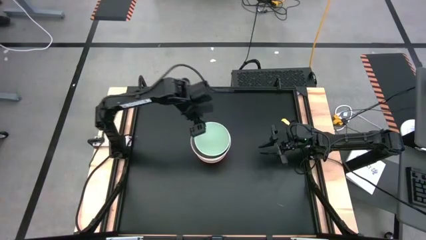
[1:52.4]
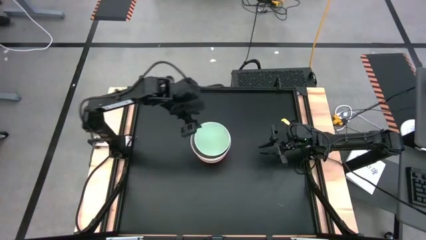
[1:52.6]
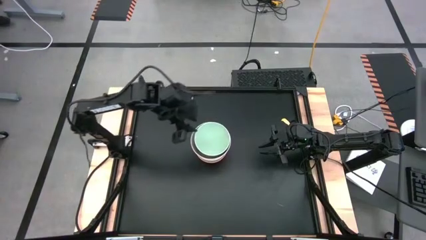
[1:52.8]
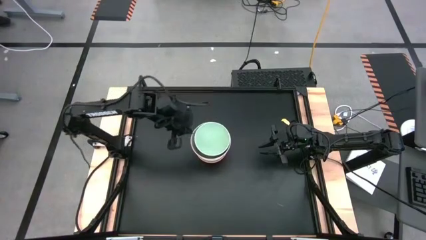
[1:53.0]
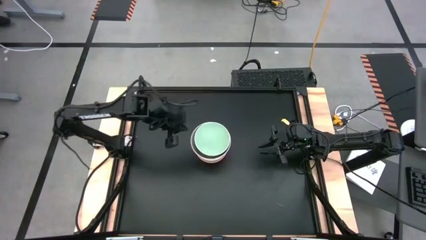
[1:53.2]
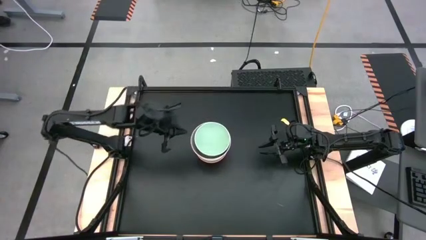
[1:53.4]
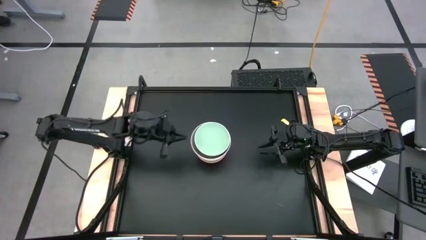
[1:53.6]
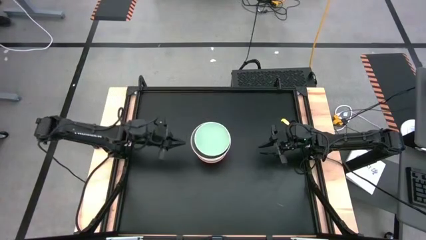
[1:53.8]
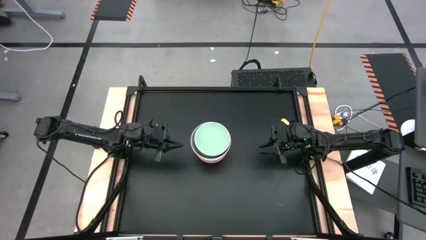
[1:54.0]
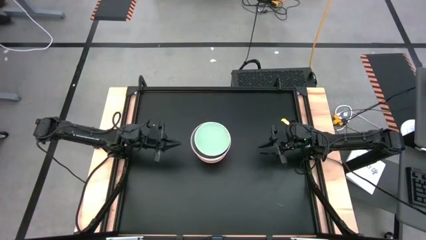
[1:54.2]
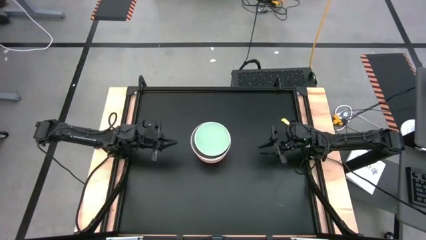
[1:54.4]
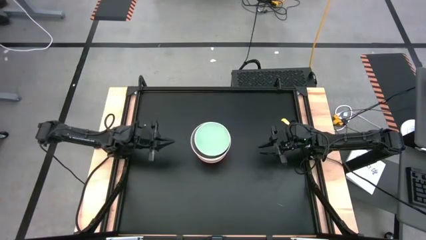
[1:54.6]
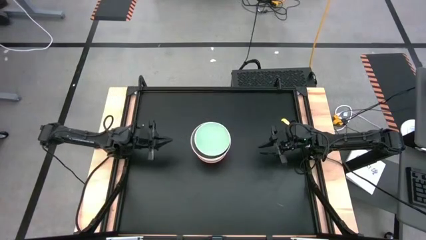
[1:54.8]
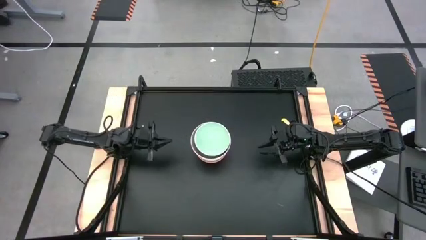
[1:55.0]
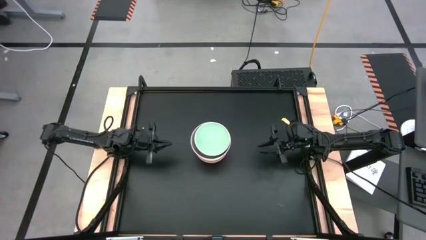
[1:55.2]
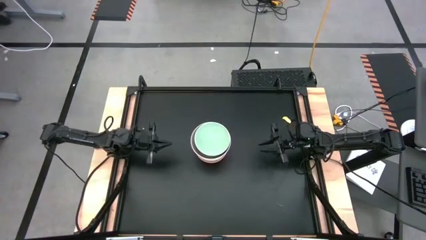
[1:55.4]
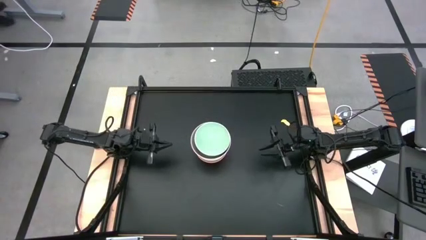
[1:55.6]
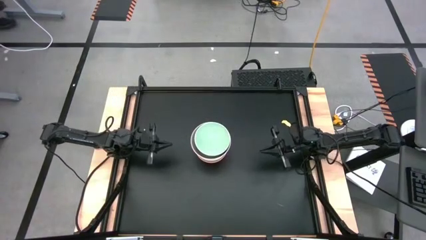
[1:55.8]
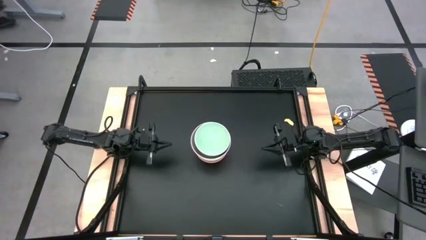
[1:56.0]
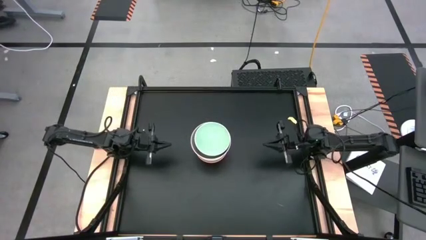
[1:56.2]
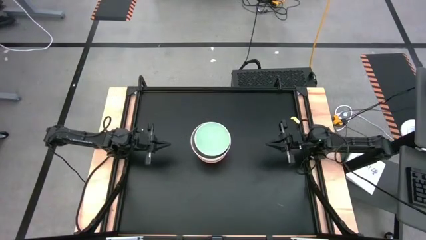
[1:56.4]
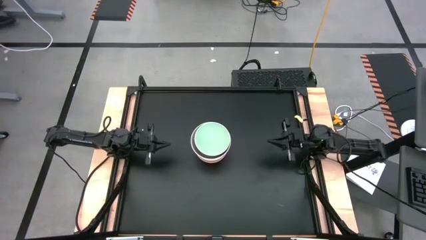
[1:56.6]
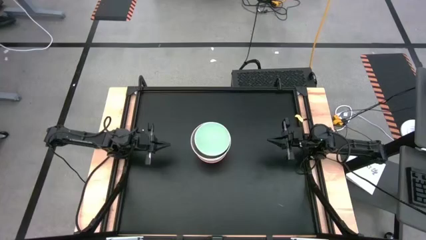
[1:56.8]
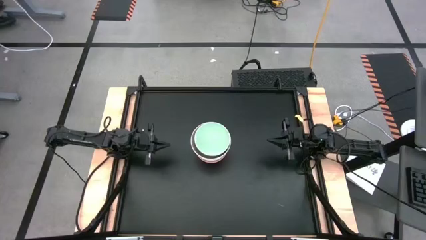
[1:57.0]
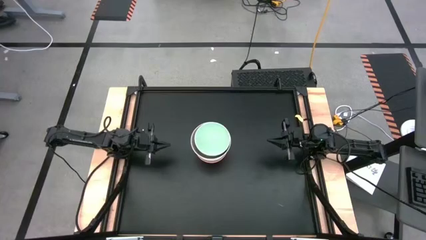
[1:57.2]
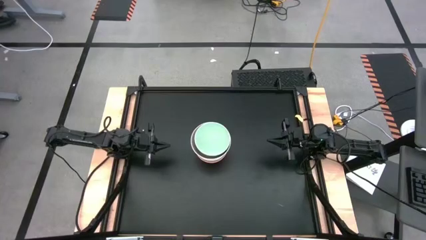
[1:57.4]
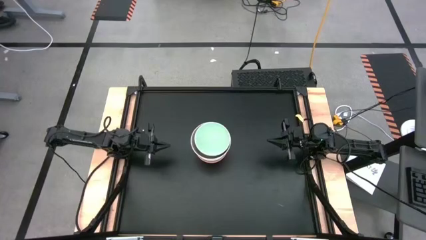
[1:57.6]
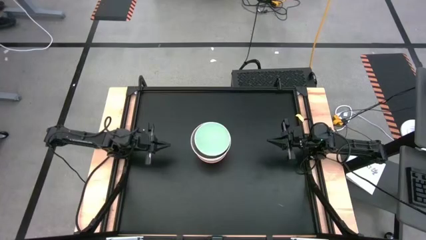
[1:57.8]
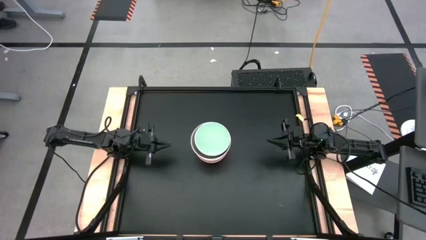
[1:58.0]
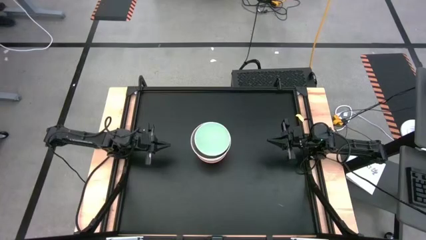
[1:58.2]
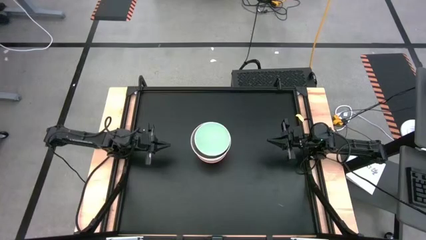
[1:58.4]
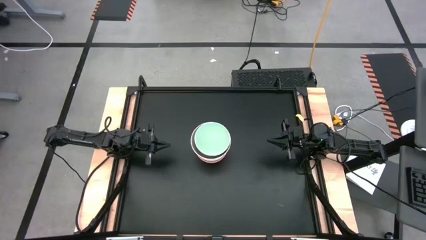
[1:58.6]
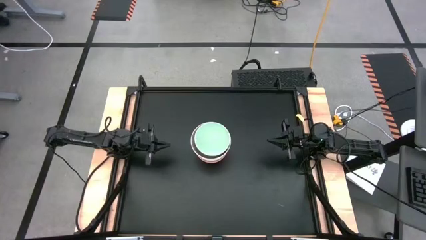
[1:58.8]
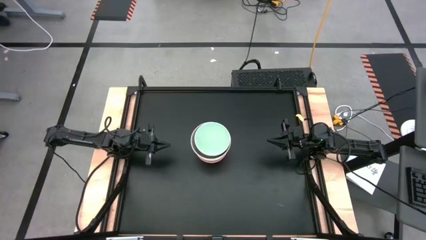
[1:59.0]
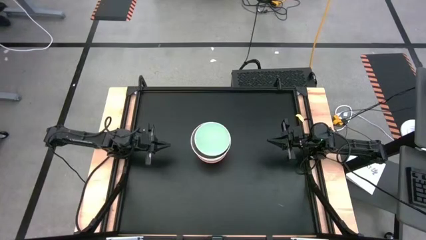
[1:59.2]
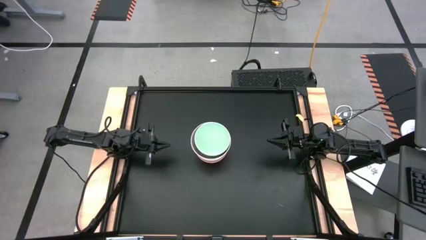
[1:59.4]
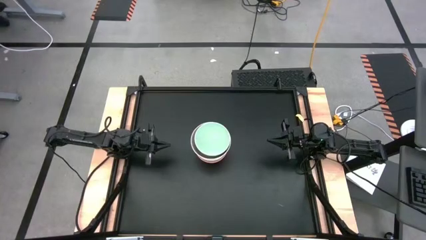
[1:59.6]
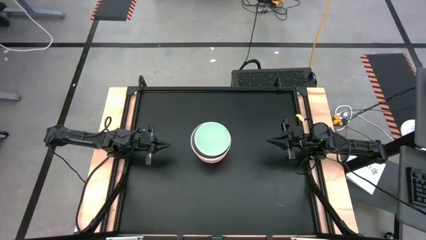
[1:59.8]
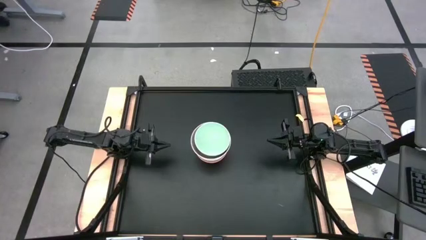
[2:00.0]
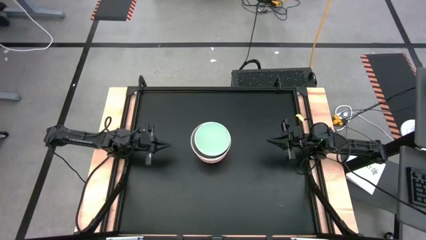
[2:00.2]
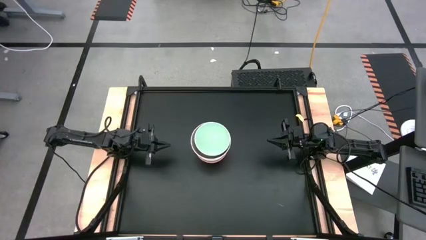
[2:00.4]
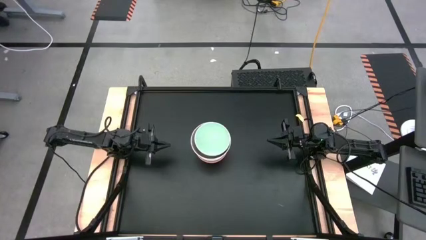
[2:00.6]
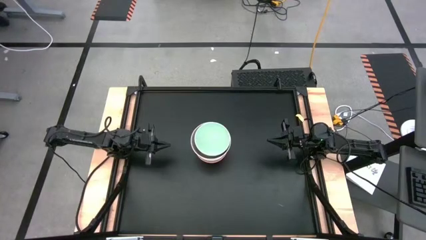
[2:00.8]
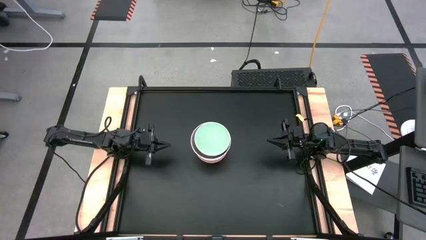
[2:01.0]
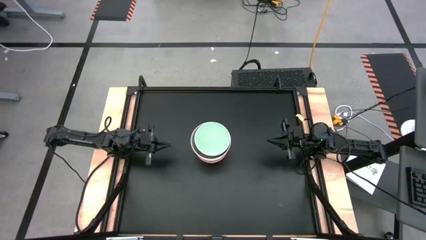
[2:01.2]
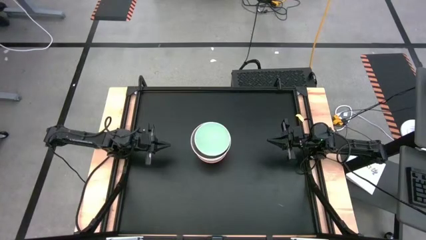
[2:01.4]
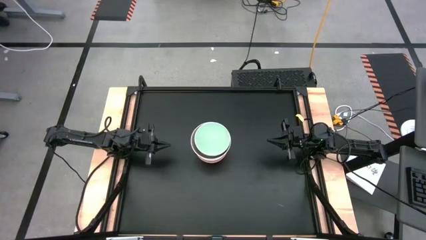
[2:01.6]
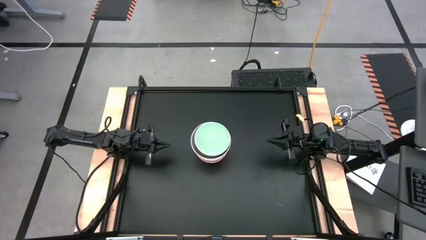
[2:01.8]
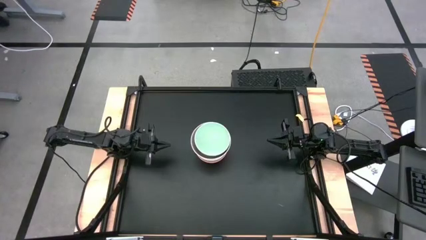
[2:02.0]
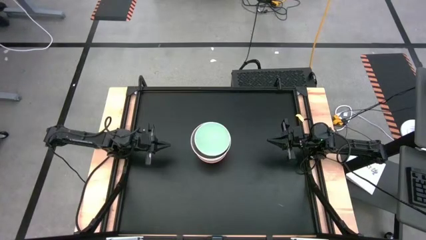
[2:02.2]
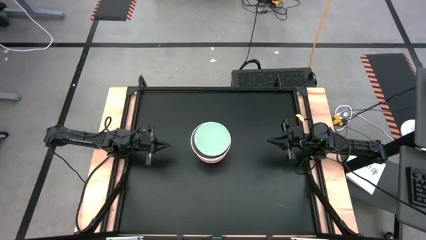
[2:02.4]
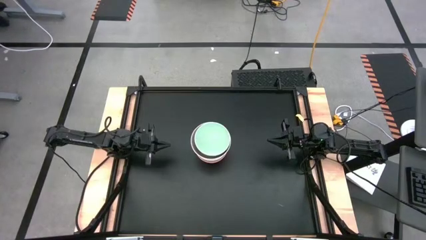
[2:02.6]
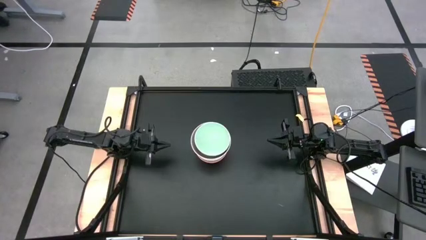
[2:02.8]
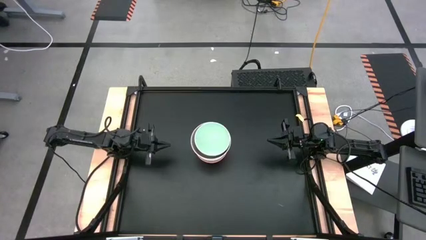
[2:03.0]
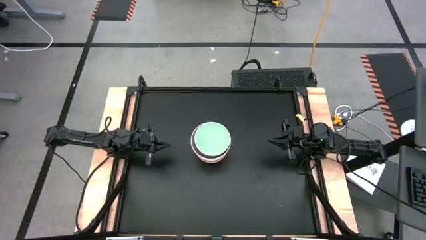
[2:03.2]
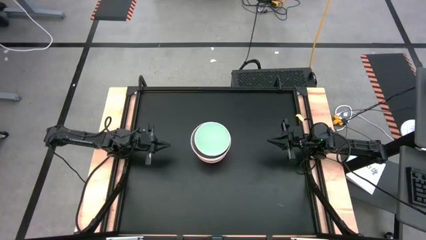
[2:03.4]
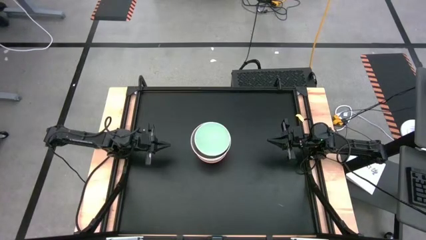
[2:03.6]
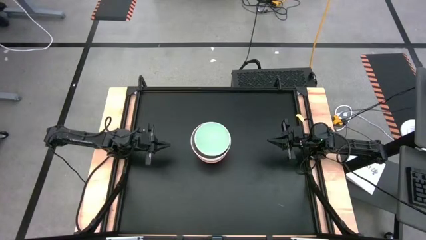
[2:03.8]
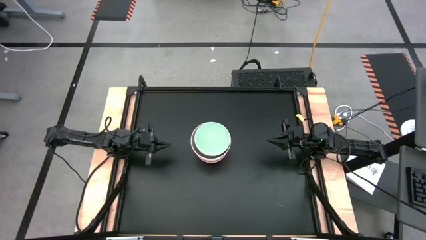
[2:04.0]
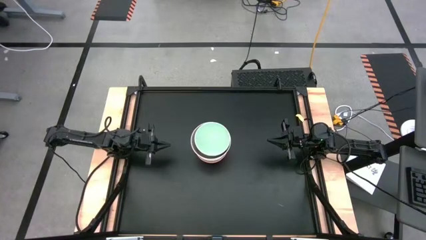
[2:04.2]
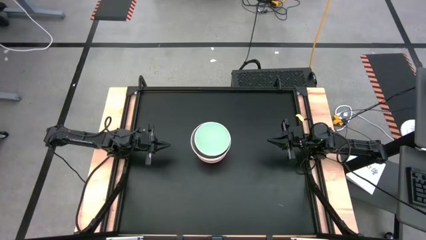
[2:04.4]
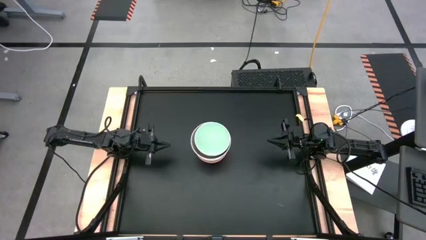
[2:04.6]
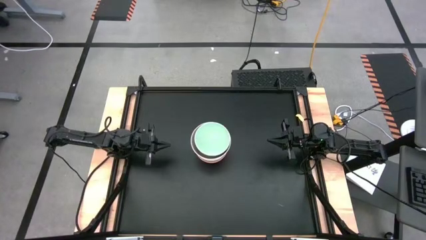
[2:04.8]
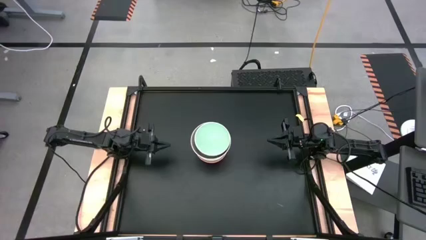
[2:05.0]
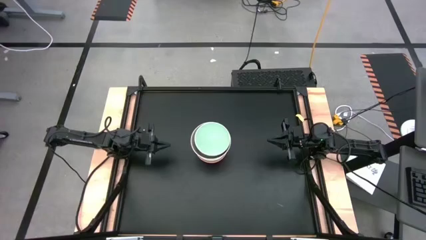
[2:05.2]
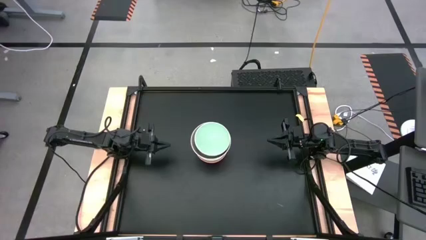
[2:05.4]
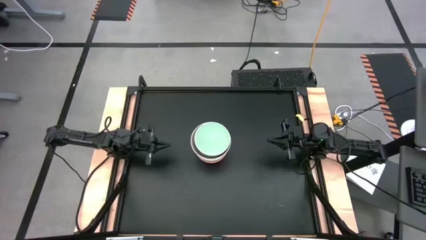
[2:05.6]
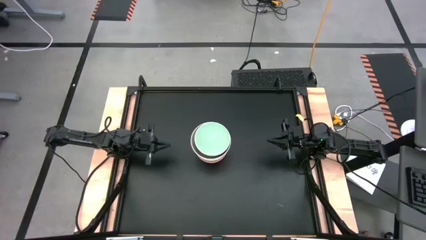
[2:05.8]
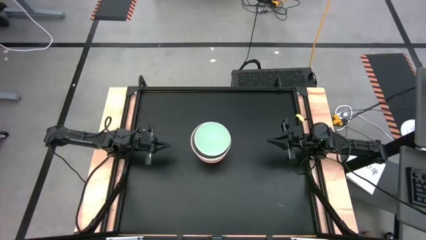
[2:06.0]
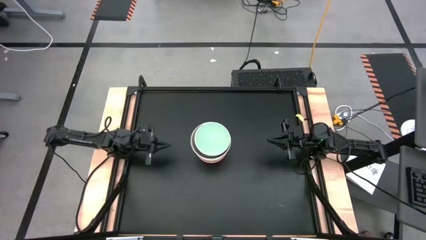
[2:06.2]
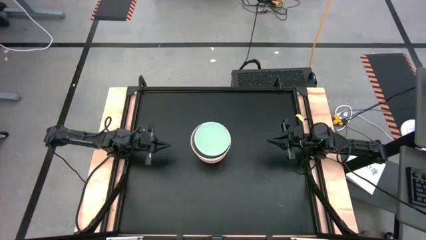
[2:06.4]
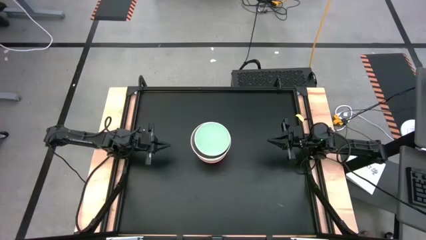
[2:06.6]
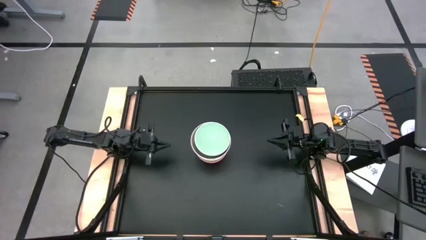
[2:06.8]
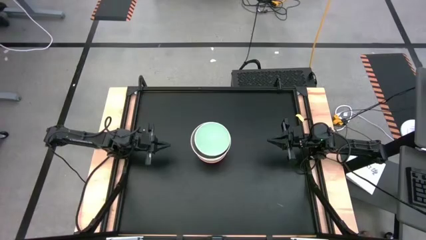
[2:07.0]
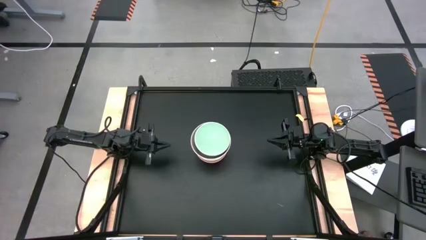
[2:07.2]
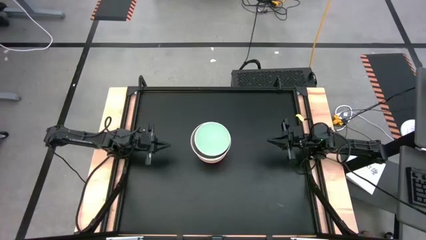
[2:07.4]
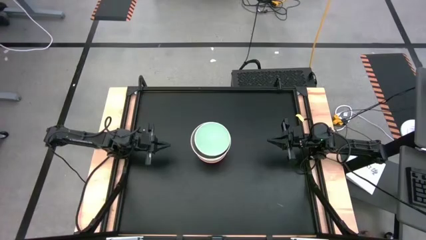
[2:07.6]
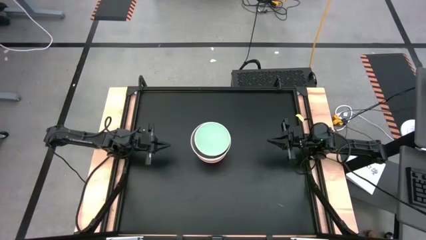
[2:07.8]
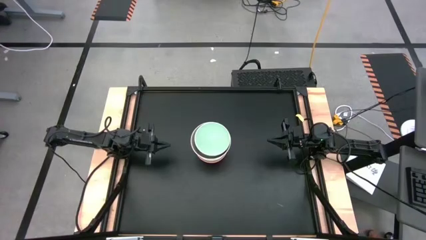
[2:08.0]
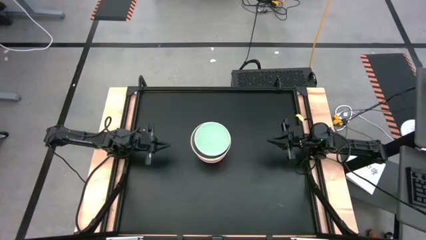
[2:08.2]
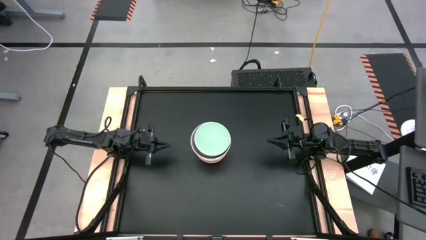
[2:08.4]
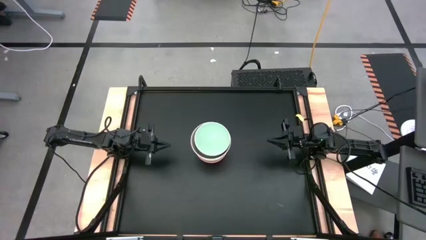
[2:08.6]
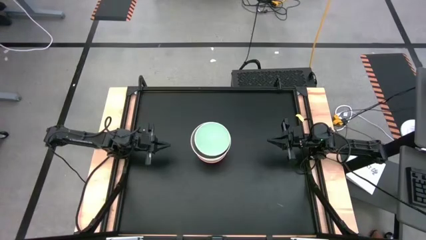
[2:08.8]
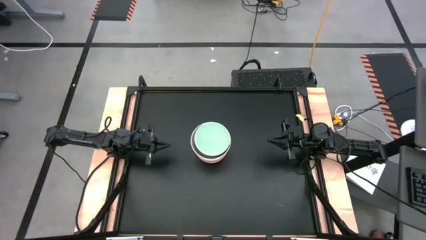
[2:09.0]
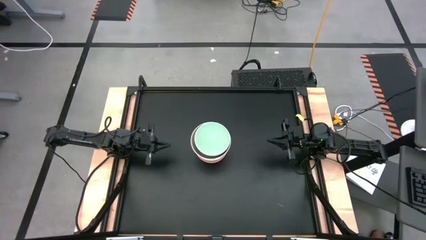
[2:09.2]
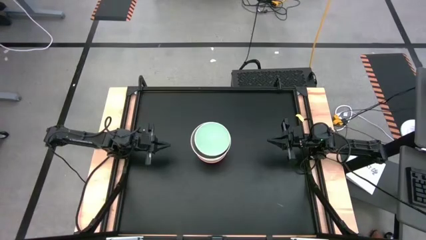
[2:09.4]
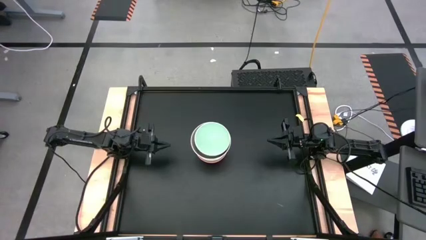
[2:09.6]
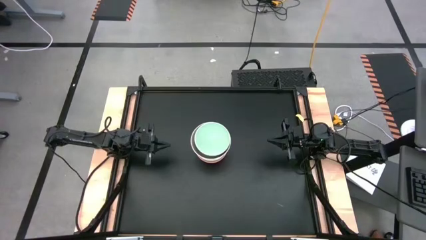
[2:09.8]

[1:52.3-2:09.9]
Task: Nest bowls inside each other
Return to Home Position
